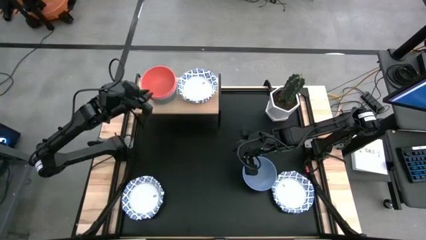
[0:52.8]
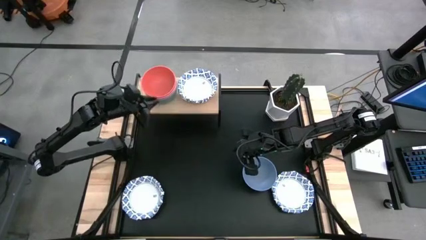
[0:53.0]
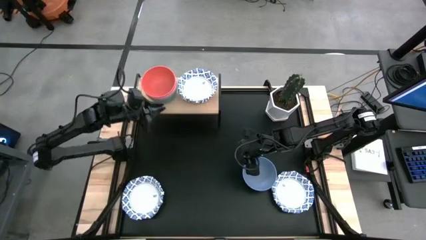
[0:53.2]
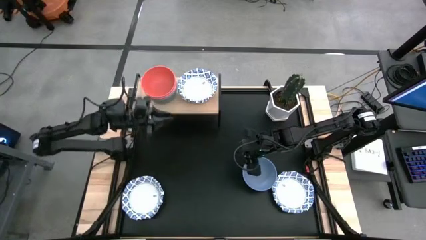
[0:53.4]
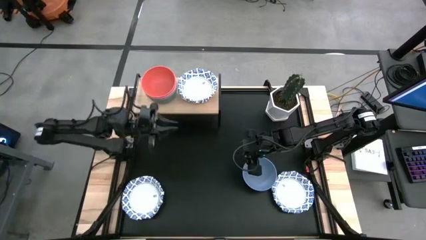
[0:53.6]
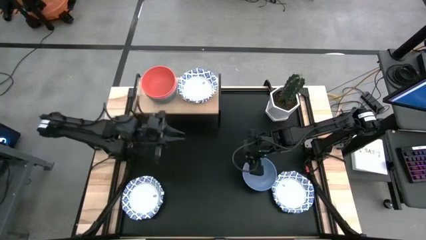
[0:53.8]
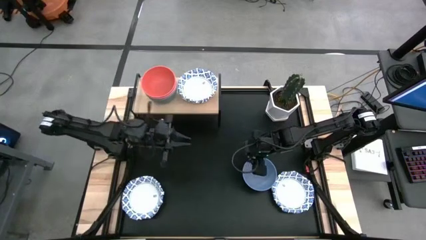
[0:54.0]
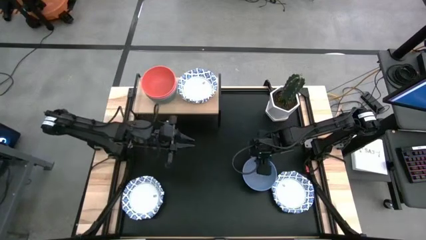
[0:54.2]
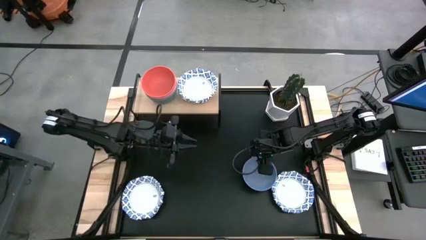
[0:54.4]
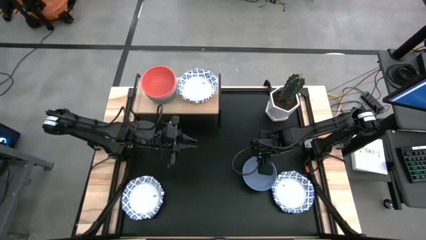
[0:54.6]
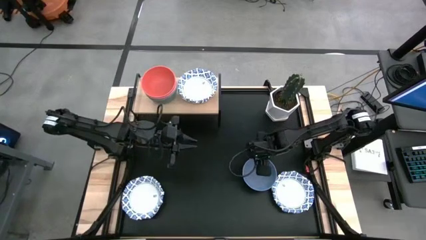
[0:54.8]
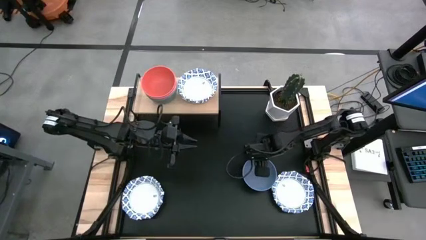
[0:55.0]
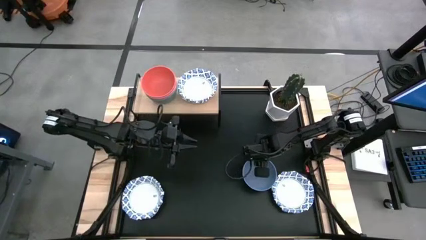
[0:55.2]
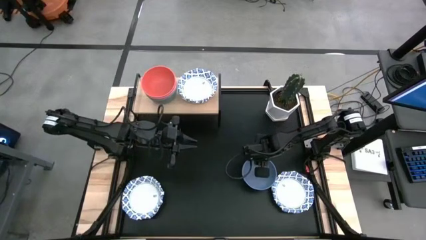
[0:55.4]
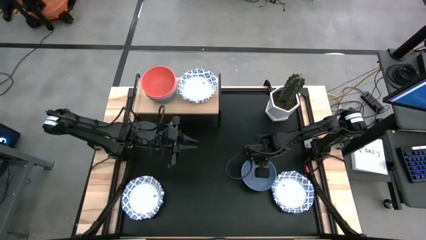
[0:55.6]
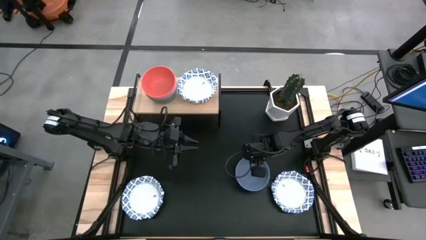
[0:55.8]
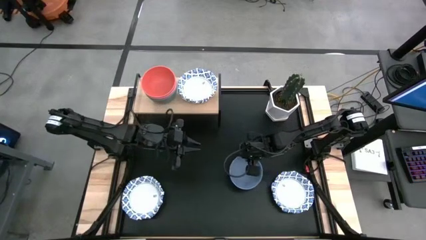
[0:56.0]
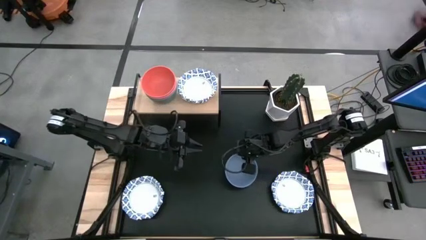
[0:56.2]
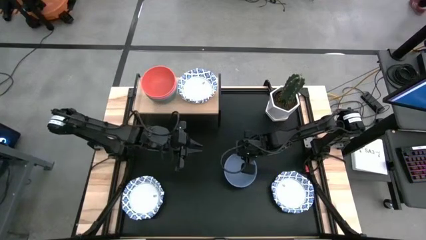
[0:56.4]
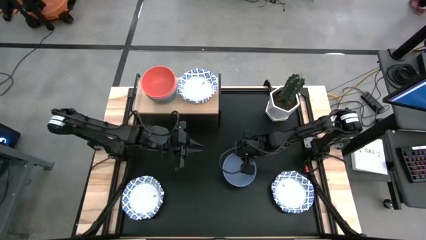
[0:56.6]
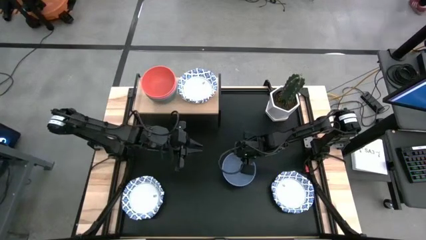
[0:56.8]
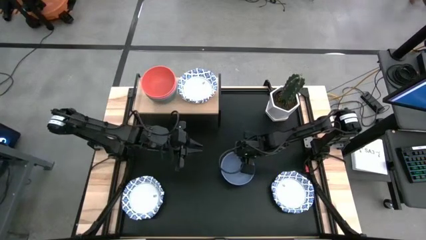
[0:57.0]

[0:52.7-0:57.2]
Task: Place and stack bowls onto a shelf
Move the light blue bowl from right to the middle of the table

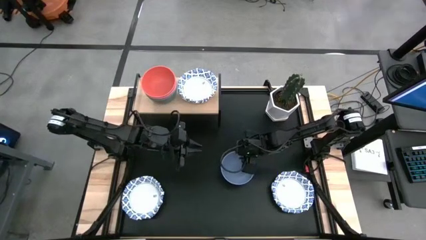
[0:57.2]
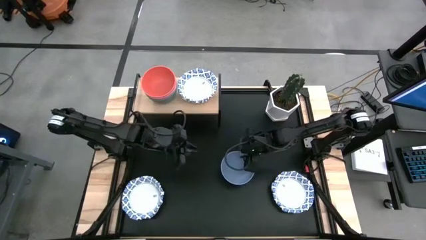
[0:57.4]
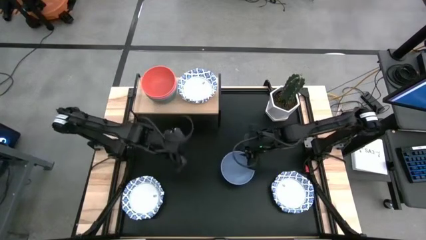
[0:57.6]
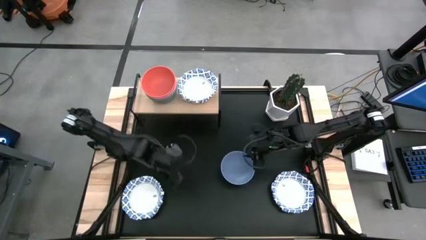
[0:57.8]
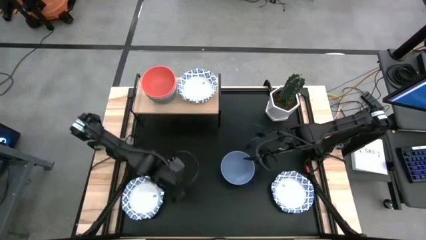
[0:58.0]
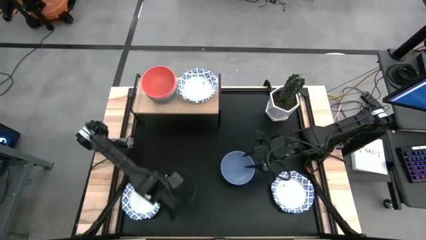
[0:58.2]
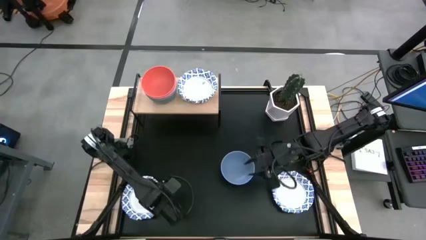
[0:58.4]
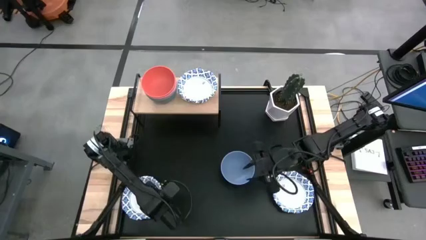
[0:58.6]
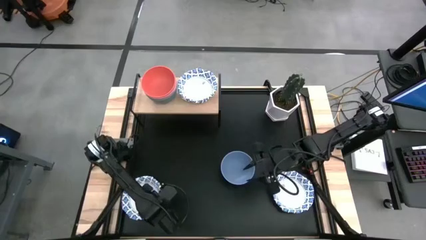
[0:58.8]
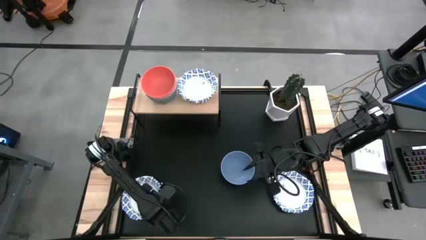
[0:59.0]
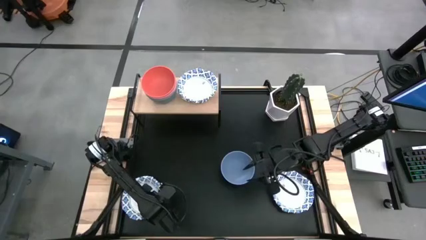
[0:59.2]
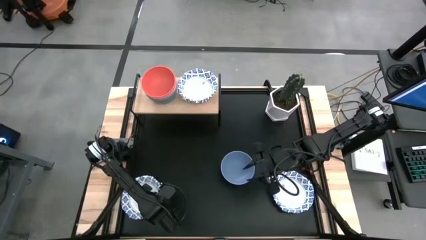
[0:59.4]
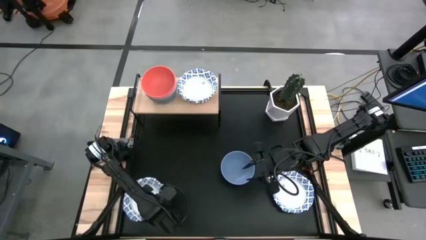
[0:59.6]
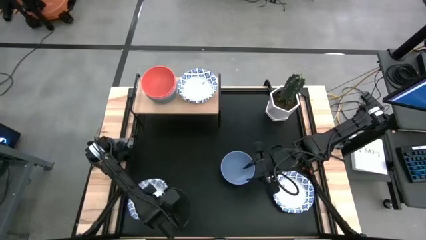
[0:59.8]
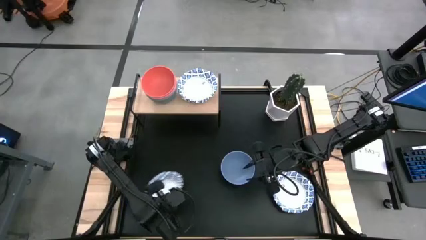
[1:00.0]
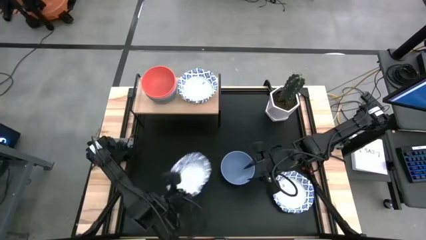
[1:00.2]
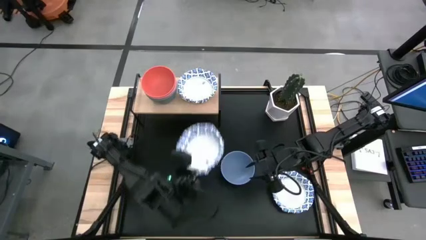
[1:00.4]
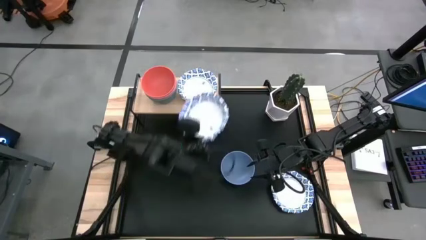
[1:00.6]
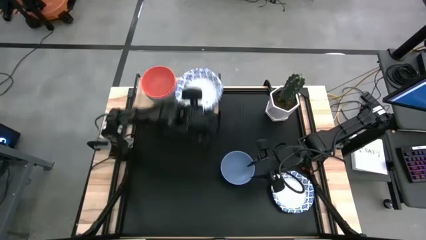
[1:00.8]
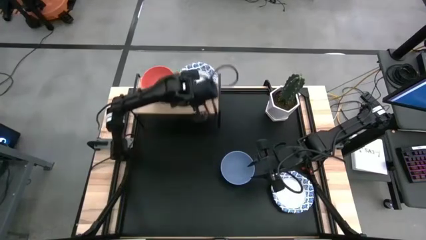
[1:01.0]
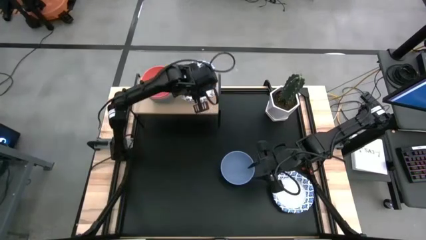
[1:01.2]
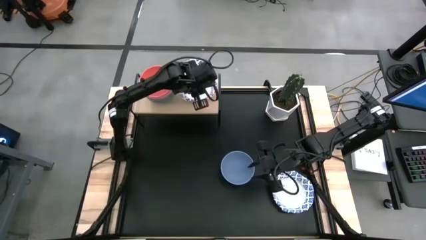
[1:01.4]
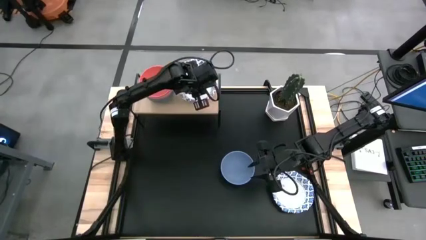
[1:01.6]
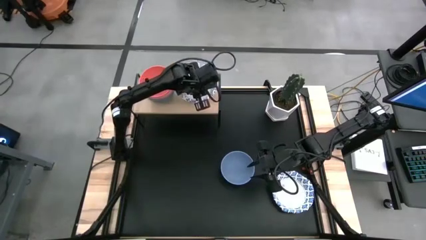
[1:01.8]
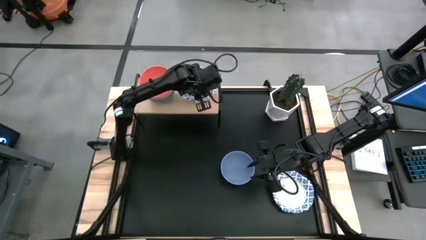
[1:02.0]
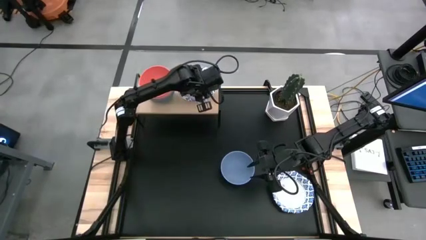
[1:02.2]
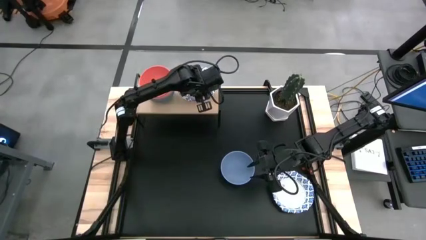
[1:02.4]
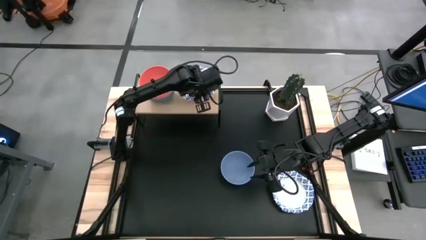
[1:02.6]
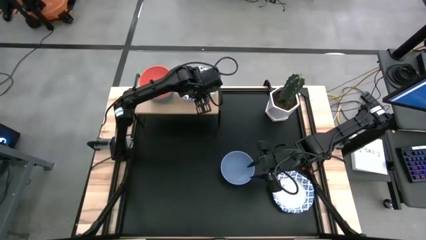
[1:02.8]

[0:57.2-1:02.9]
Stack the white patterned plate on top of the white patterned plate on the shelf

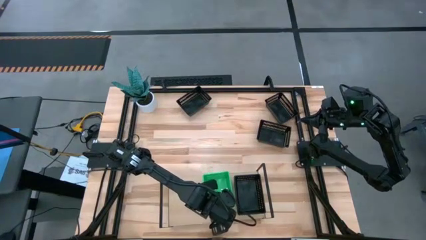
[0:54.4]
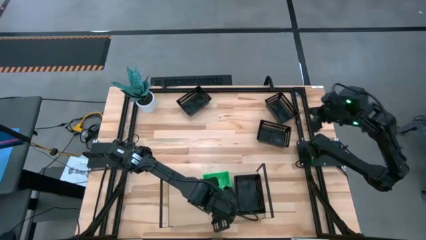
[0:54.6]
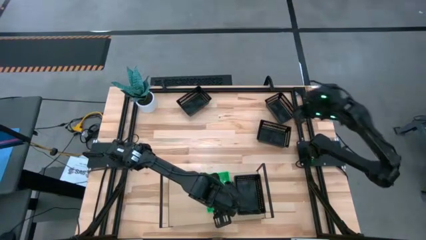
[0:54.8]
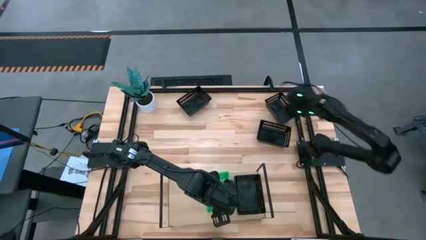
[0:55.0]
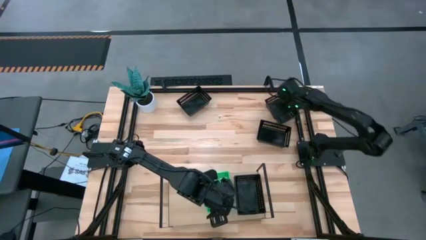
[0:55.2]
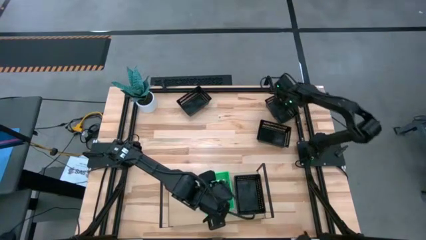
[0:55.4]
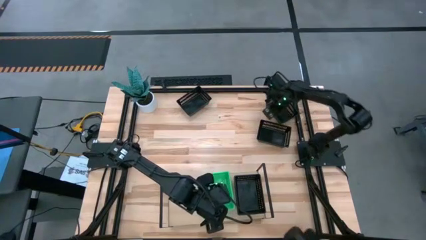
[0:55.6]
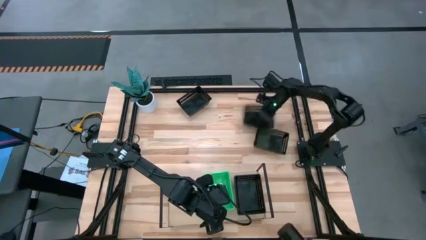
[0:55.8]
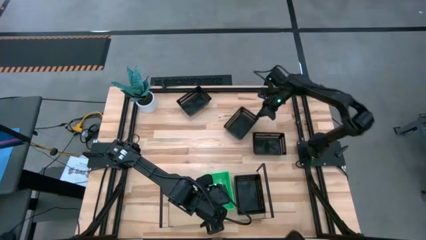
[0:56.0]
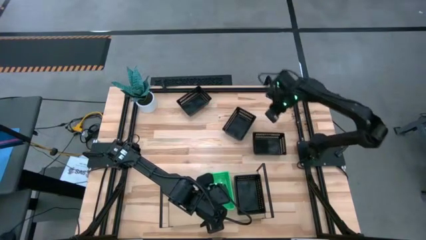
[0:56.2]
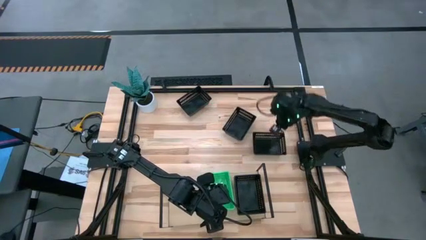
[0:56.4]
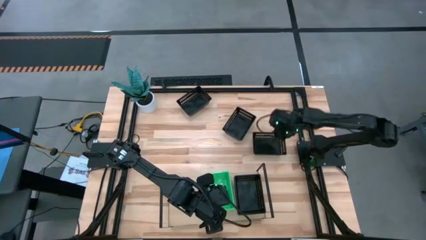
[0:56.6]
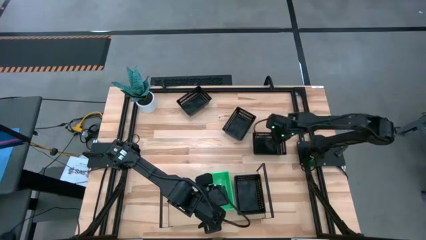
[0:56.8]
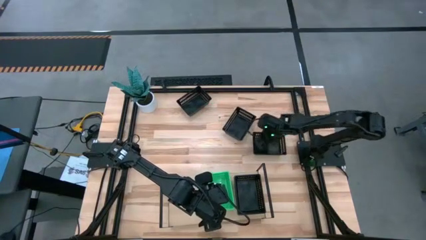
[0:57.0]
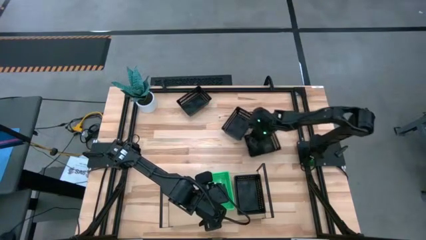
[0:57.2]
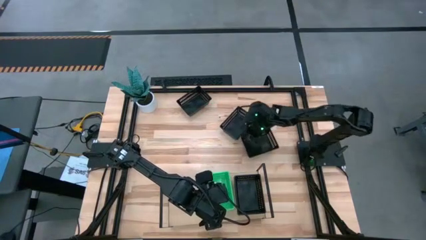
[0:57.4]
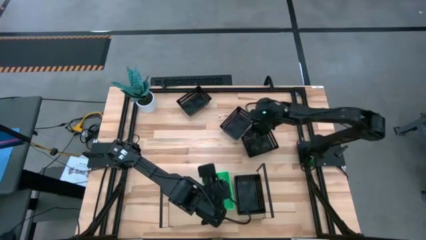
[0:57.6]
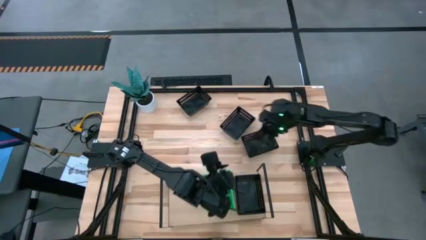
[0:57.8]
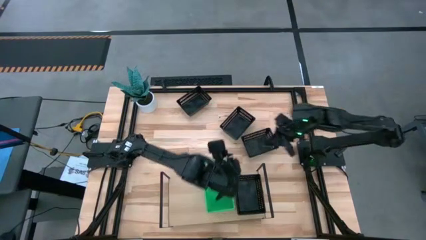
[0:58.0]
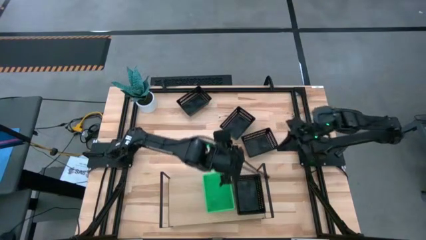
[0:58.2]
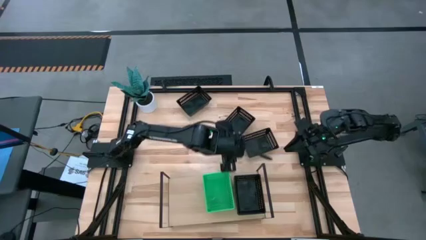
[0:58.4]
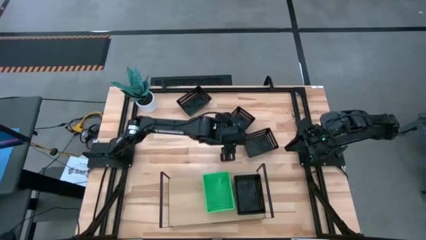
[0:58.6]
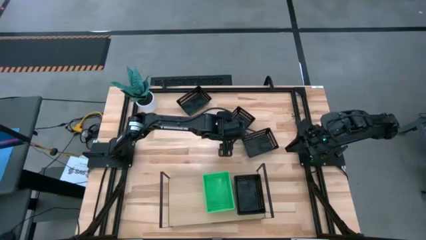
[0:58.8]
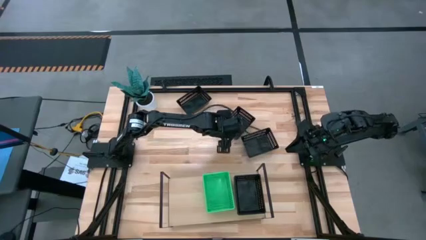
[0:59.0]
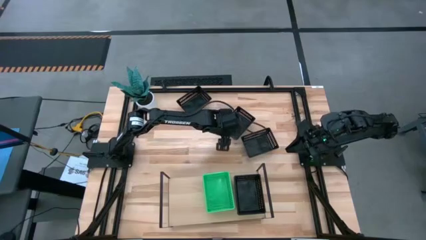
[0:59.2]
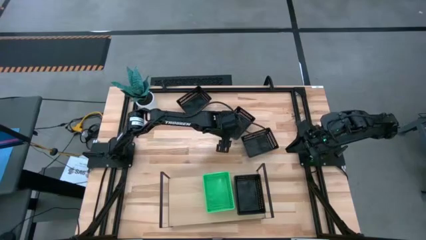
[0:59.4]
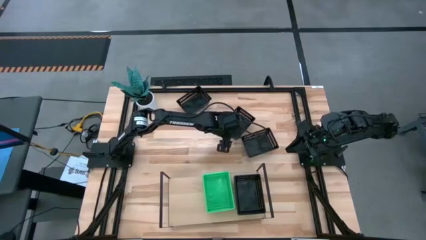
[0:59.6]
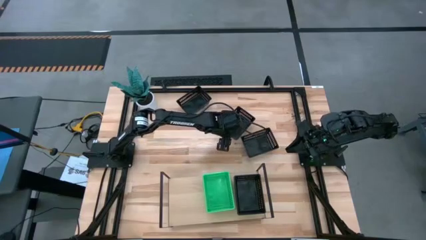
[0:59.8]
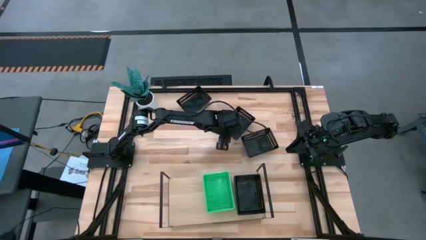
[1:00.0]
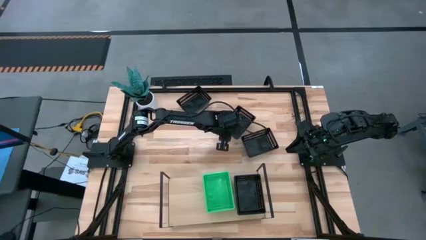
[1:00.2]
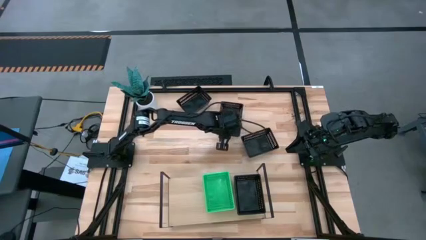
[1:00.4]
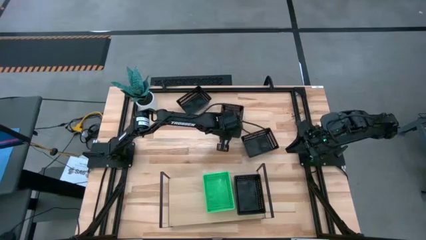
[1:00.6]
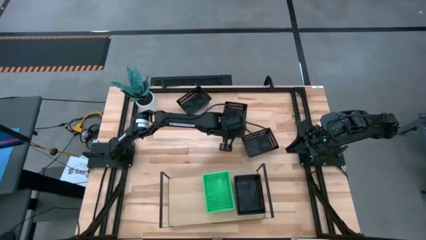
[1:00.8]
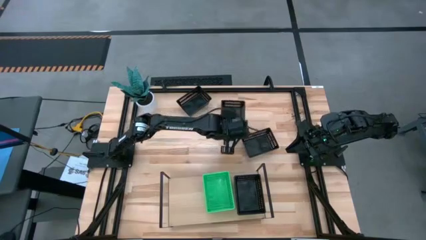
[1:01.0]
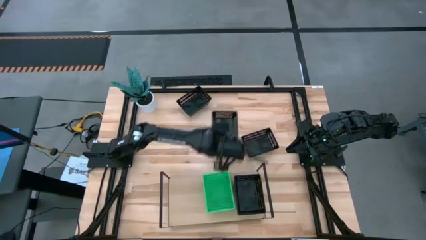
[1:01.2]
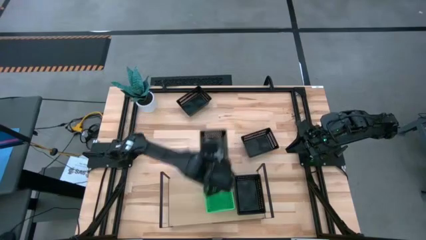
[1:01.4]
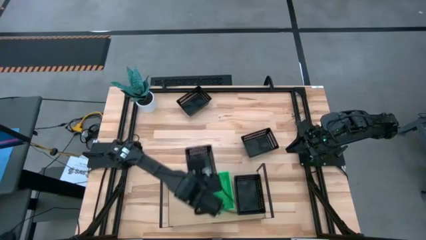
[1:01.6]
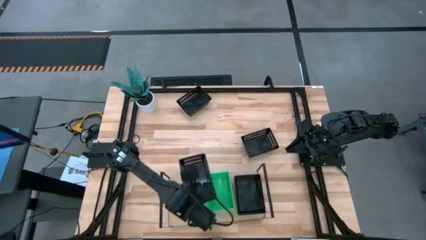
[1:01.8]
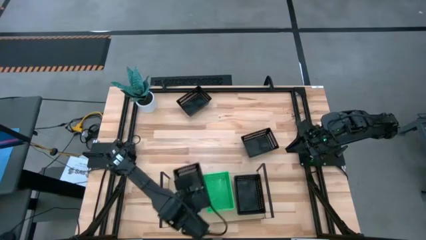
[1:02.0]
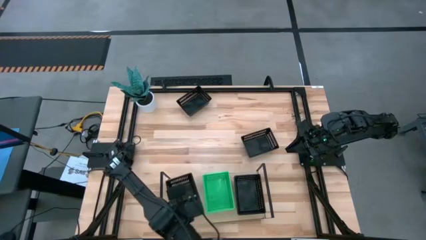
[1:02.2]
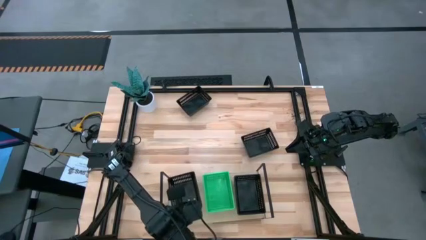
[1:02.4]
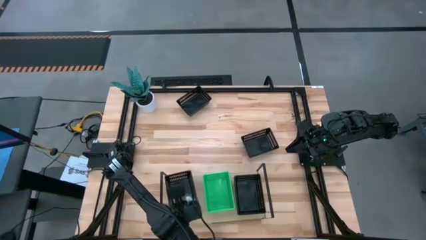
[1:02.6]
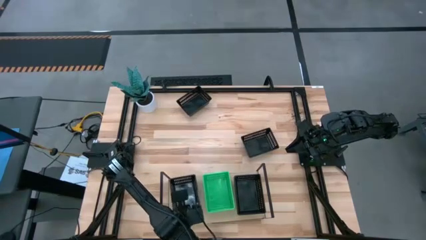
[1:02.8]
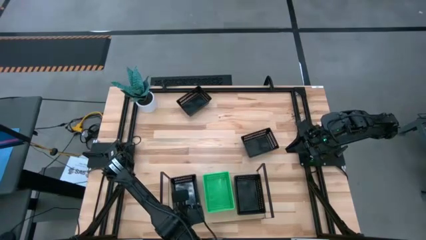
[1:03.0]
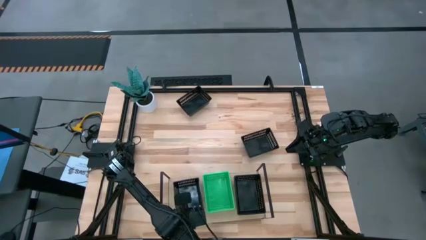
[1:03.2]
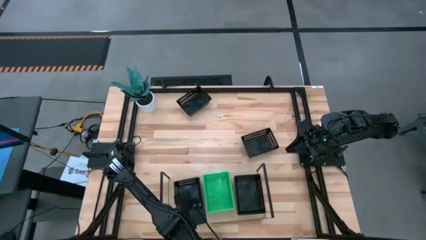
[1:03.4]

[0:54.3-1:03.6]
Task: Stack baskets on shelf by color
Put the black bin on the shelf
